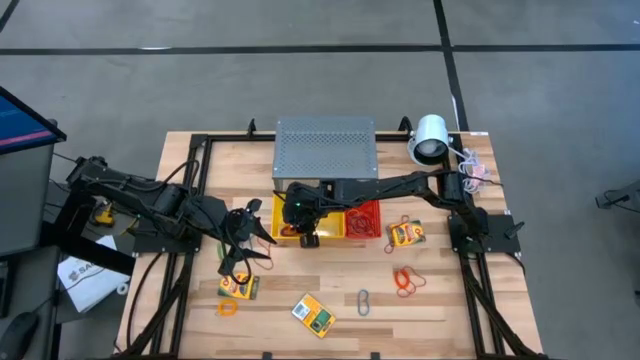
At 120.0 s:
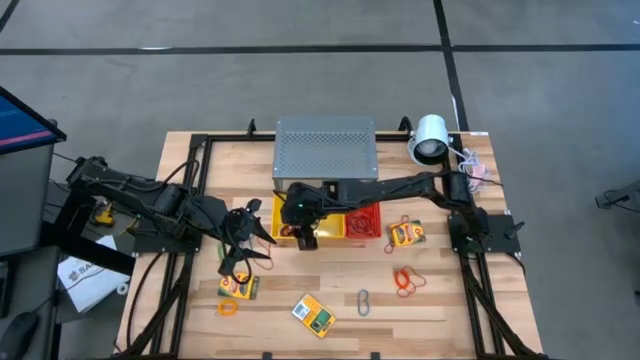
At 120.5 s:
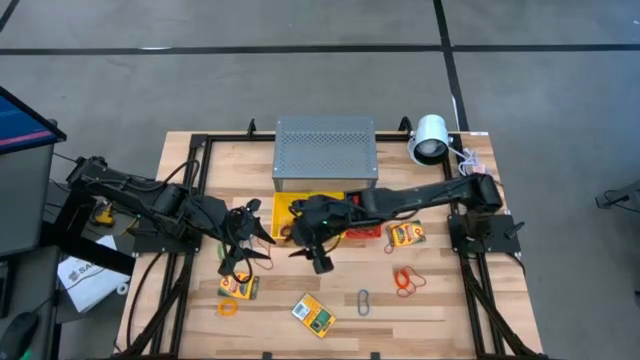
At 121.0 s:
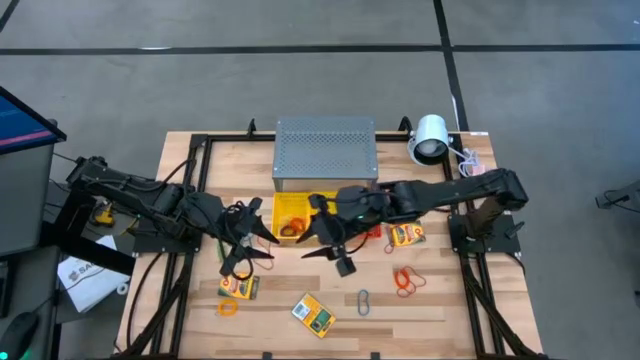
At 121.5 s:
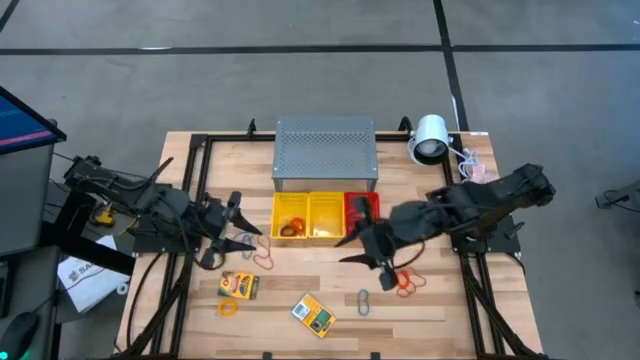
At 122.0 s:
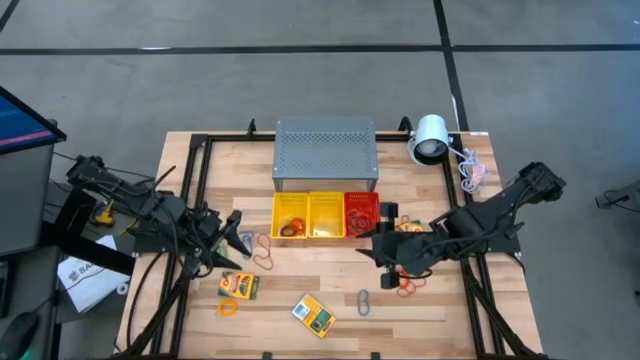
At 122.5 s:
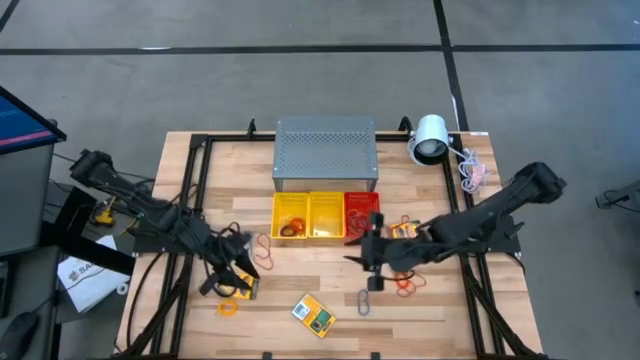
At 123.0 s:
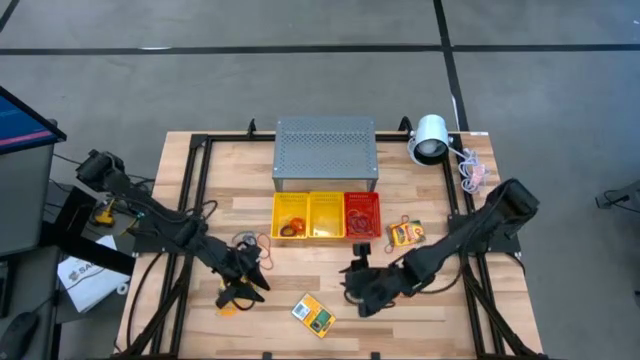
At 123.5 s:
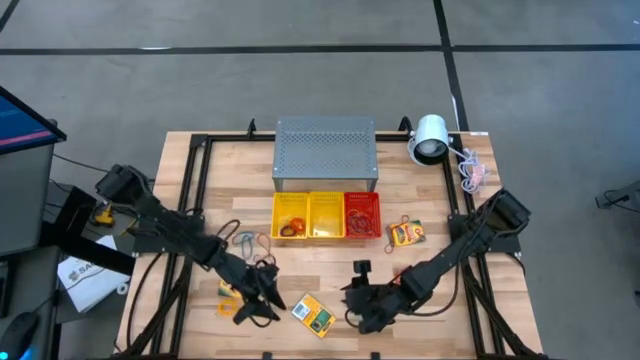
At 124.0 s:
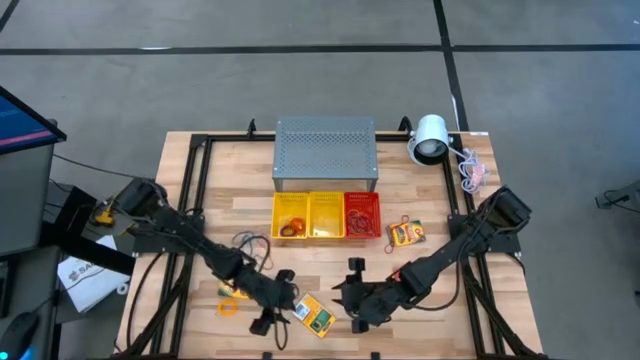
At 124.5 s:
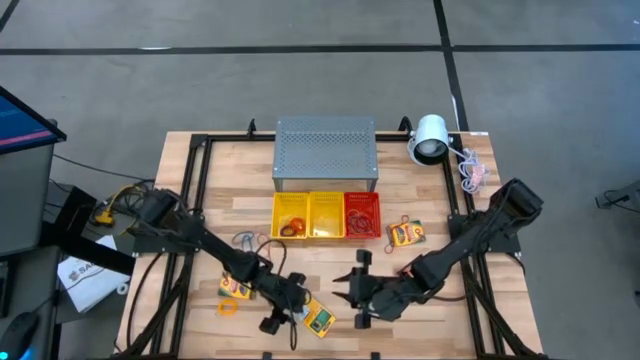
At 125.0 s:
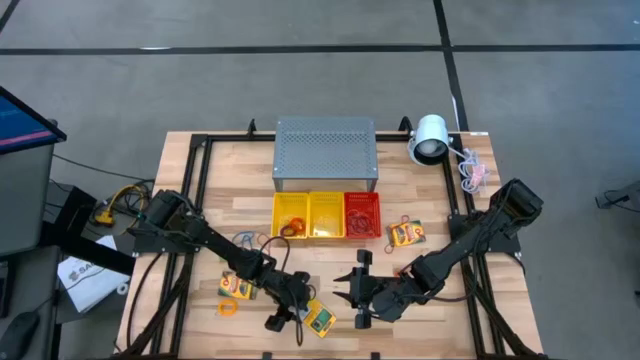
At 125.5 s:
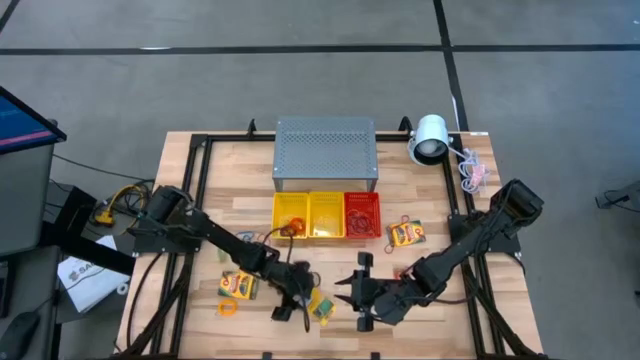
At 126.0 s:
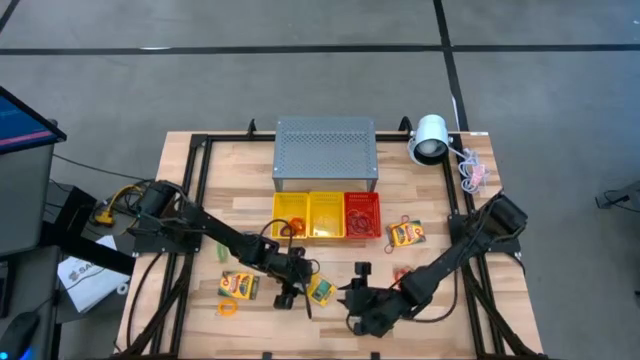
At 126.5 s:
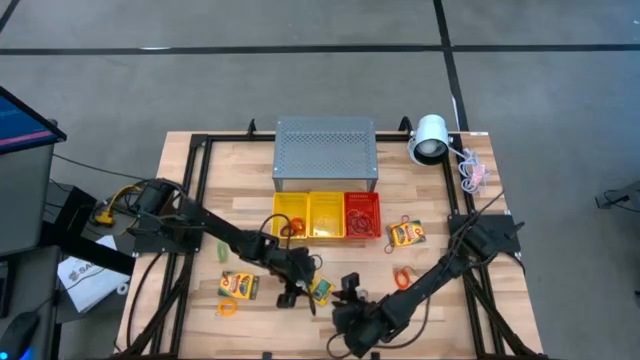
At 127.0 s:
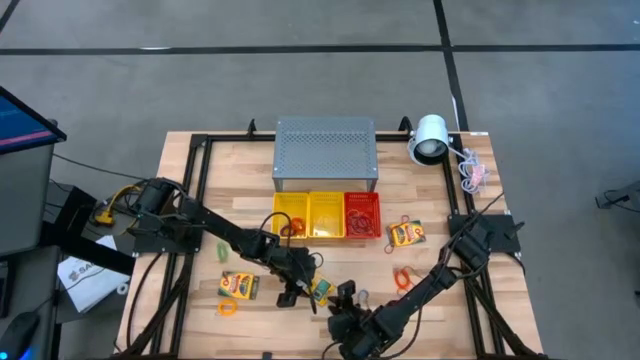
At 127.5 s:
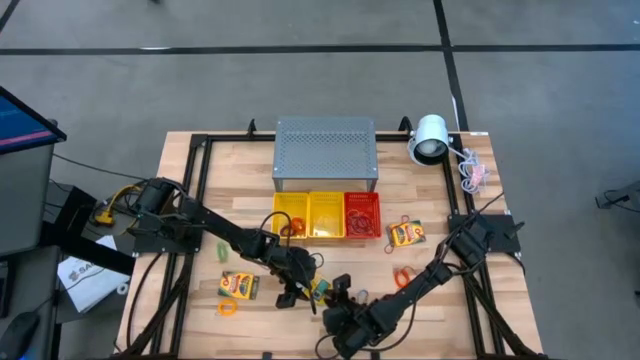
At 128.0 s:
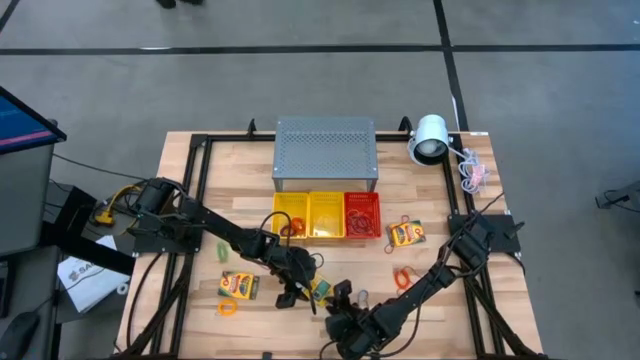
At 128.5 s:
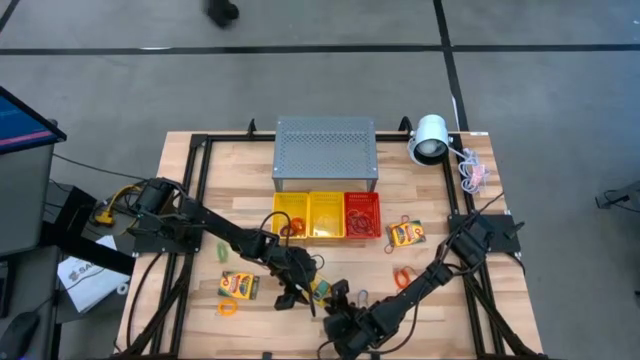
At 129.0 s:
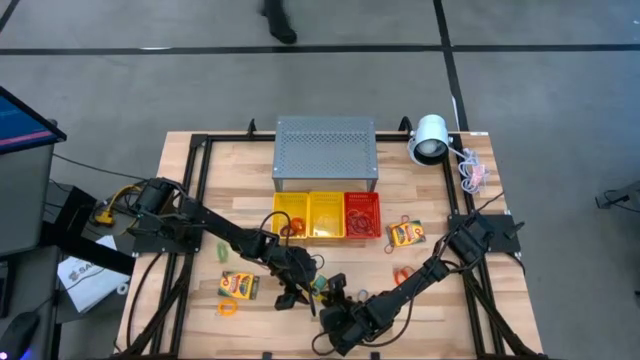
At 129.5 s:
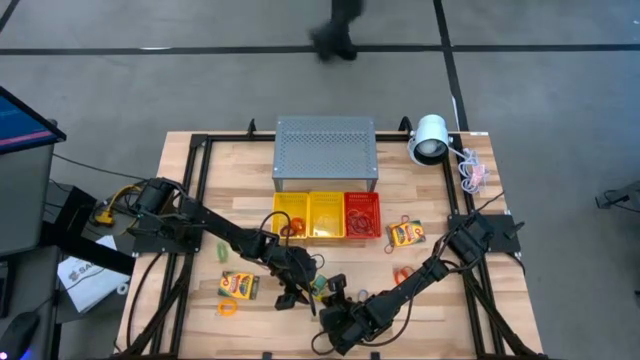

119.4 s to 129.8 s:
Task: Pick & Place Office Desk Supplies
Put the yellow crayon box into the right yellow bin

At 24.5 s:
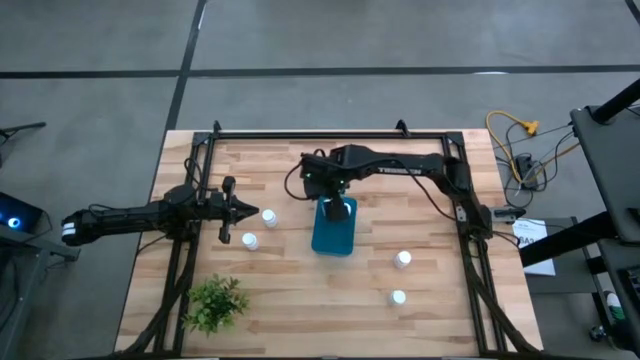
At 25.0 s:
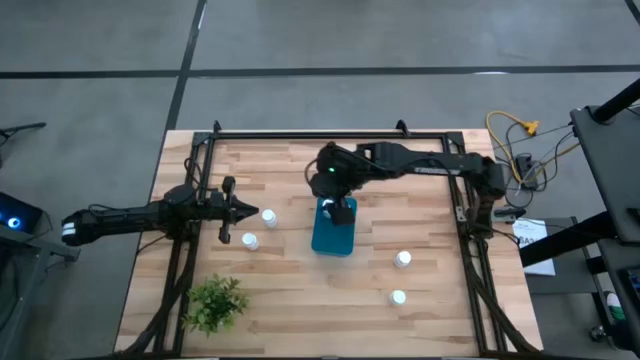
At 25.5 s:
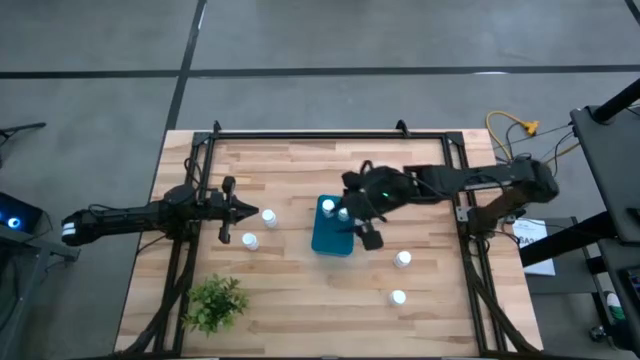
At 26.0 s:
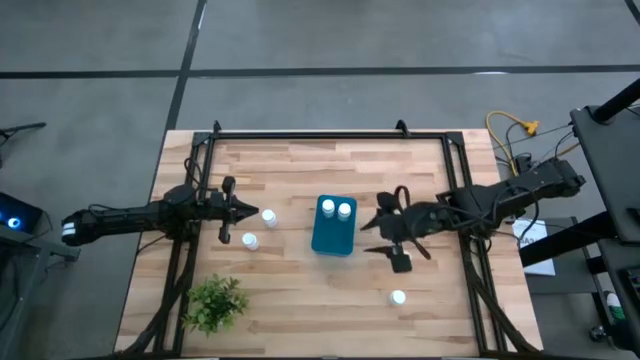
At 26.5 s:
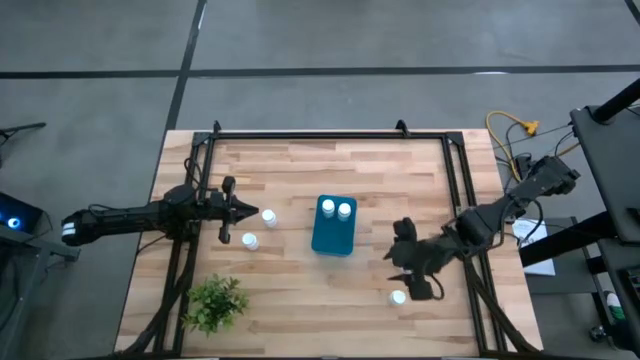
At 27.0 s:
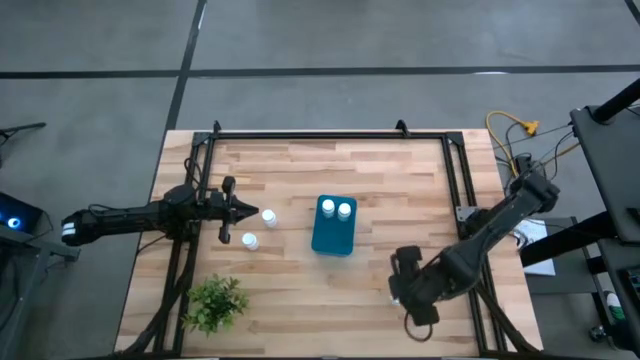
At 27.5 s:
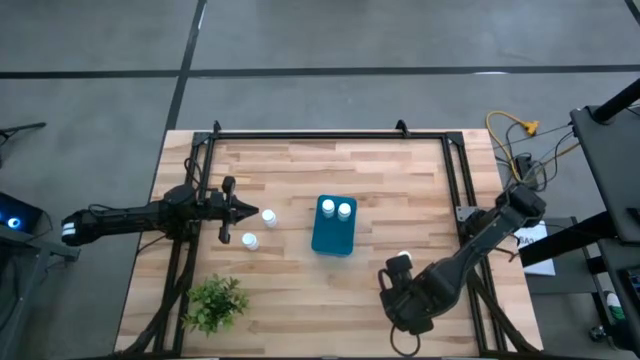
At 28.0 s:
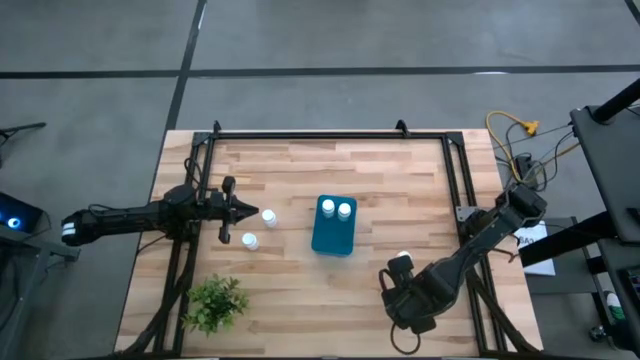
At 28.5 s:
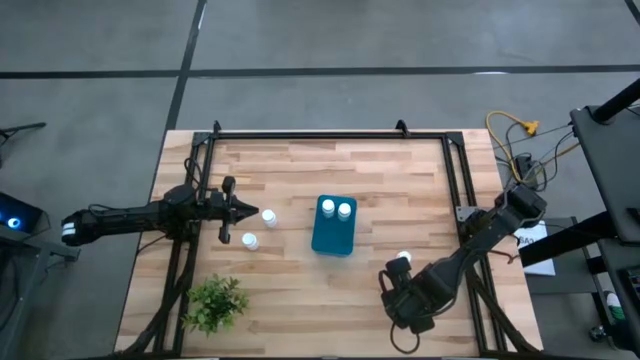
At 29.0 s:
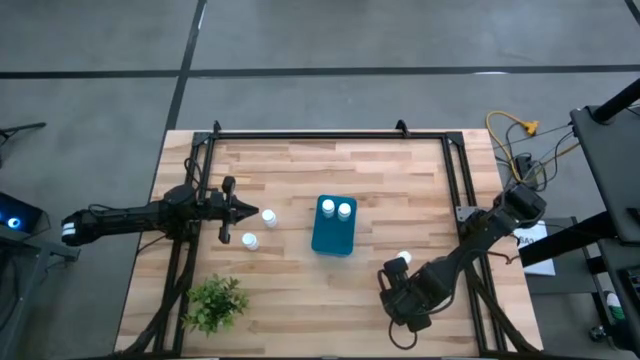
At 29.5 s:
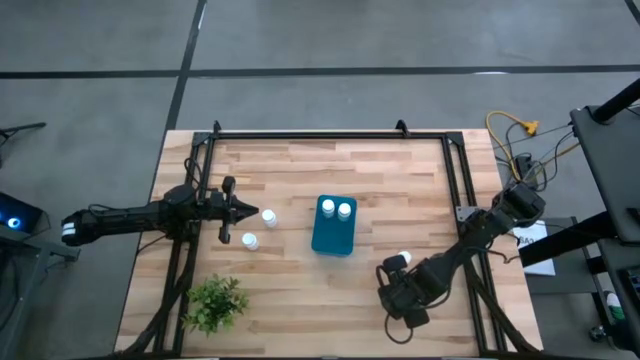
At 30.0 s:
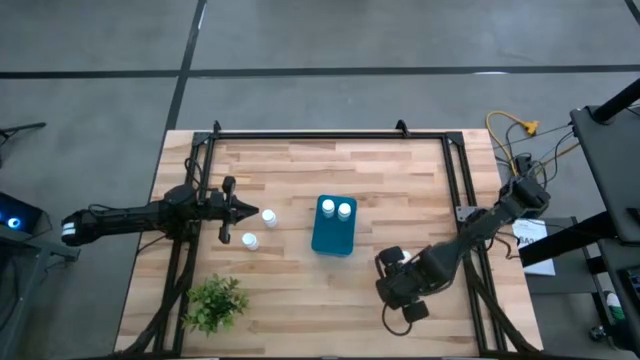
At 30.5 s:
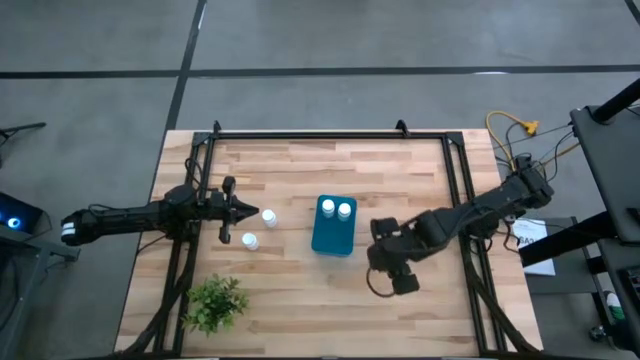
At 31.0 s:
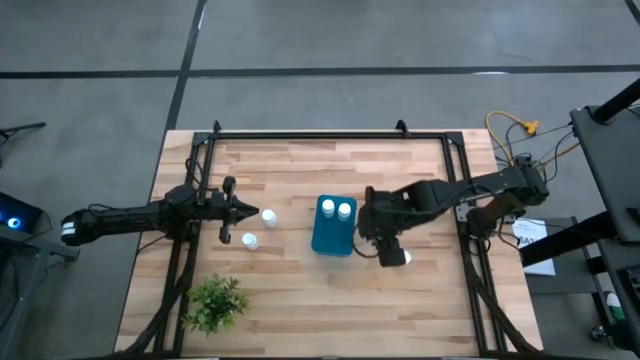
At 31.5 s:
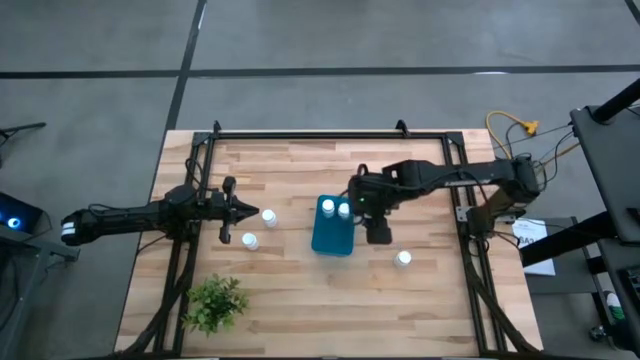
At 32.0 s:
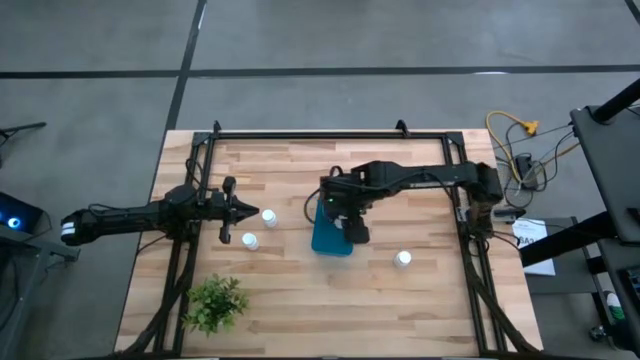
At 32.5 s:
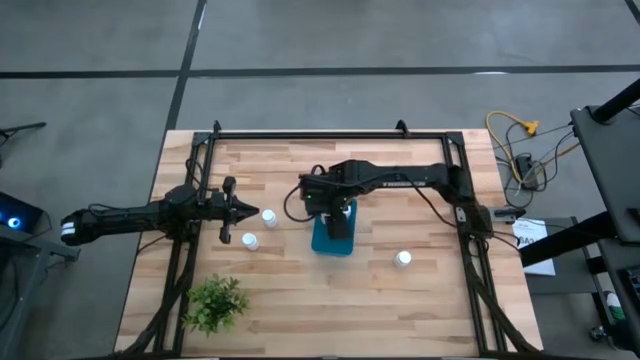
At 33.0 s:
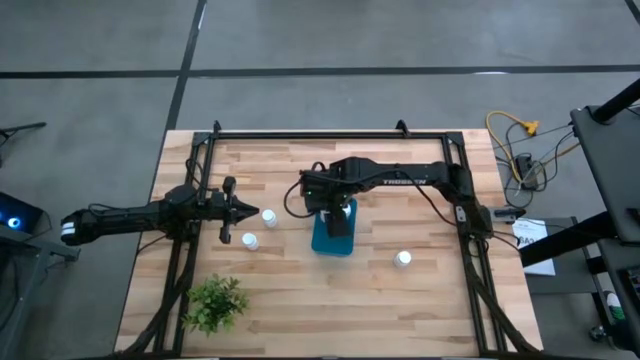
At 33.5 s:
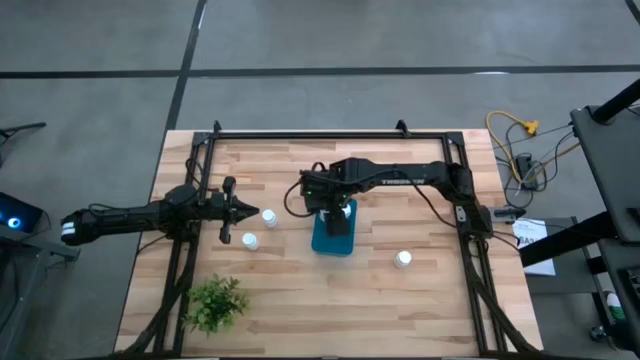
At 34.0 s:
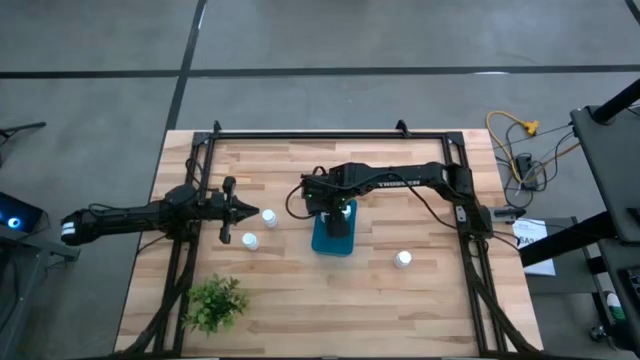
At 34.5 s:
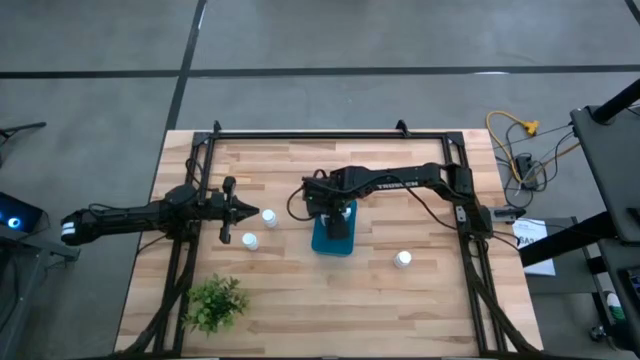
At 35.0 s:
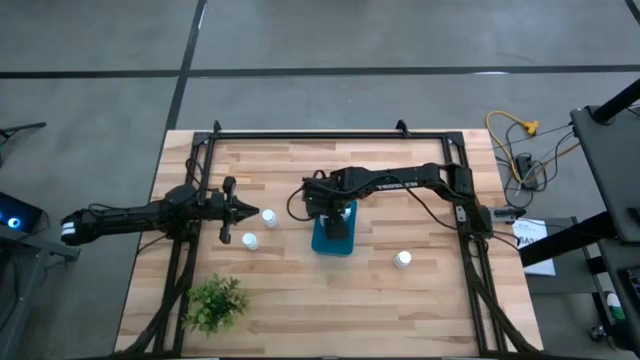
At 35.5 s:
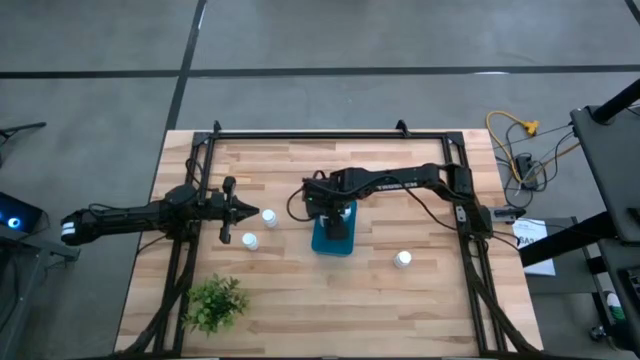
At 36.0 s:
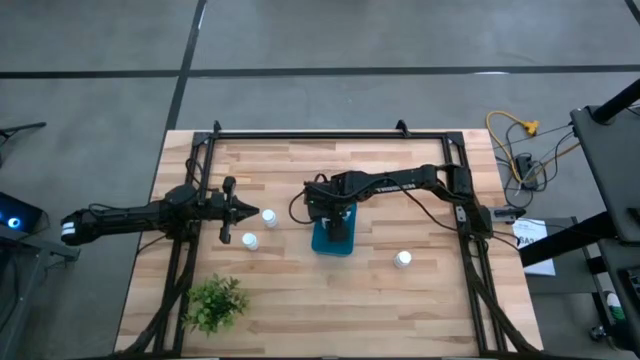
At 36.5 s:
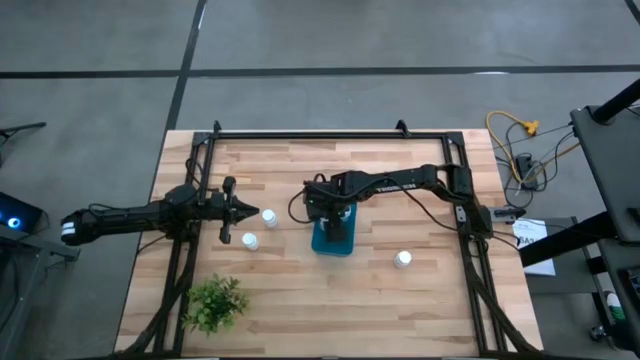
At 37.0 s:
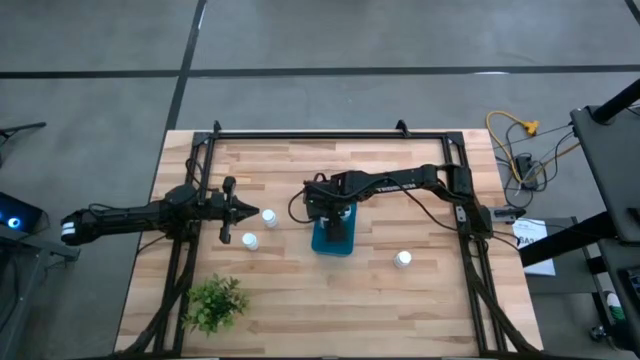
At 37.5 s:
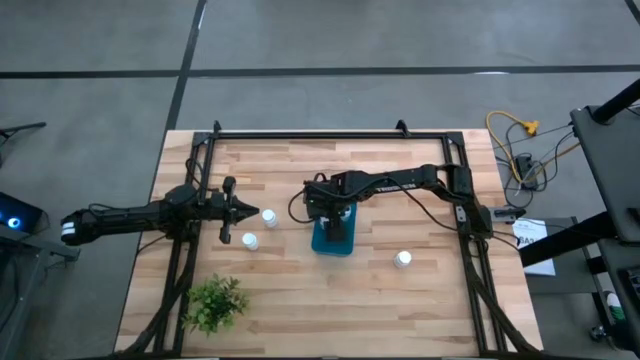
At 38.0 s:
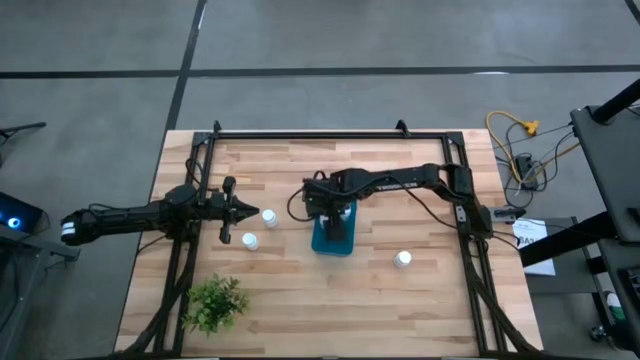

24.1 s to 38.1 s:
Task: Pick and place pill bottles into a basket
Put the medicine bottle into the blue bin
